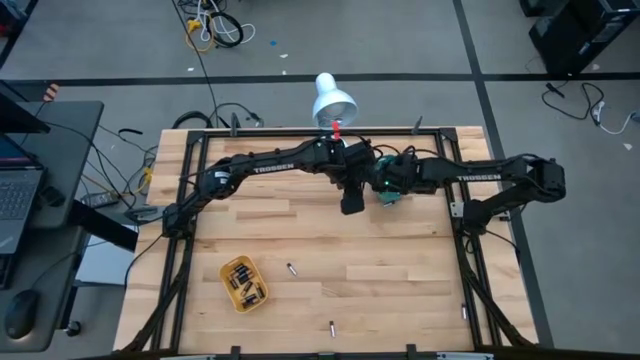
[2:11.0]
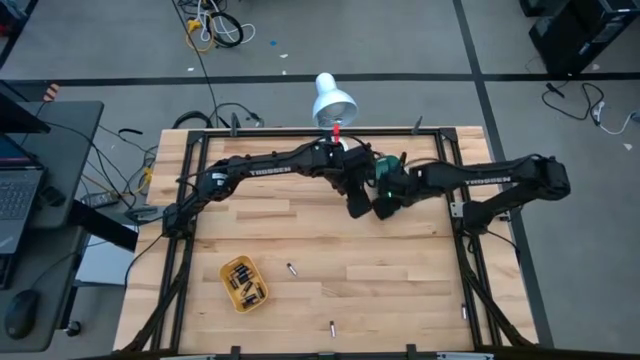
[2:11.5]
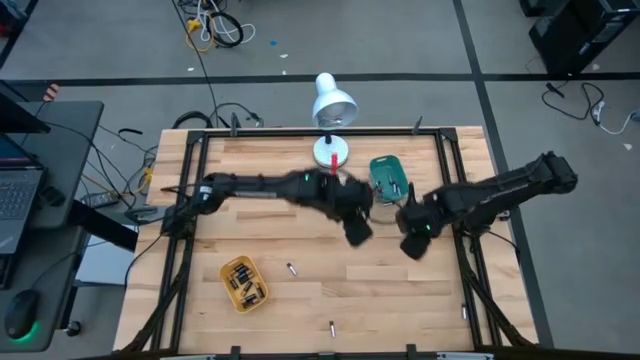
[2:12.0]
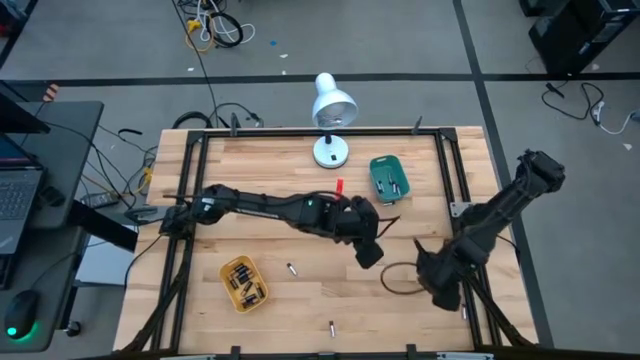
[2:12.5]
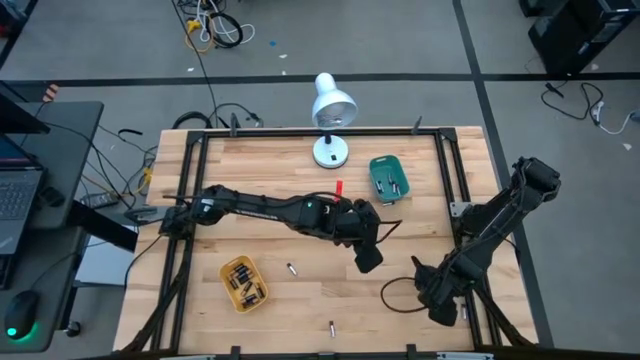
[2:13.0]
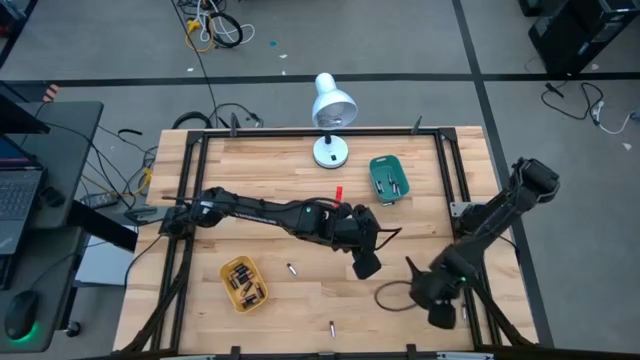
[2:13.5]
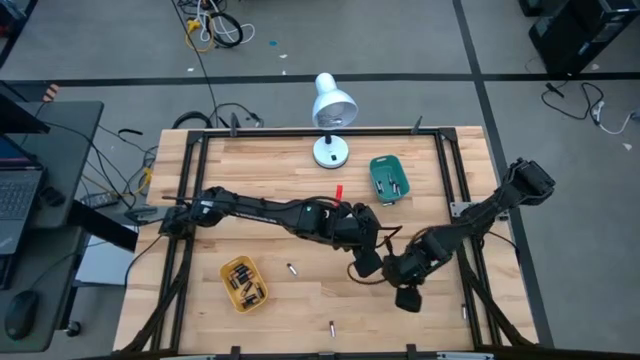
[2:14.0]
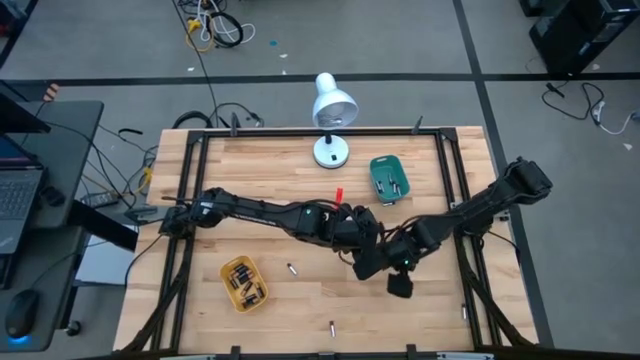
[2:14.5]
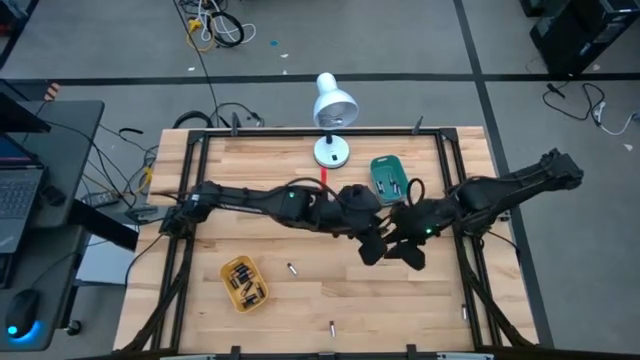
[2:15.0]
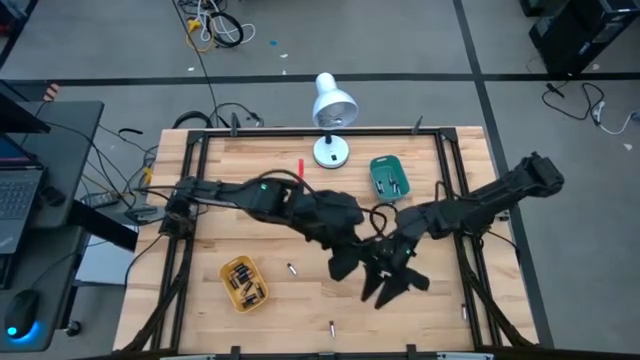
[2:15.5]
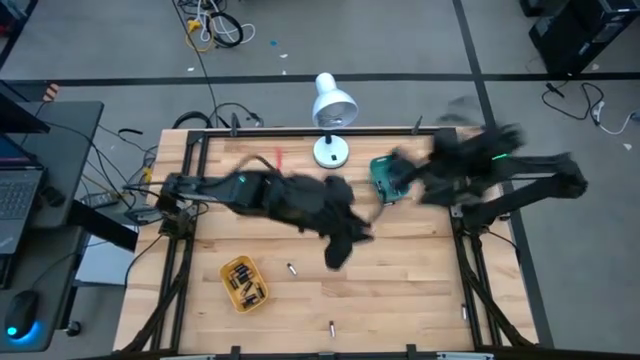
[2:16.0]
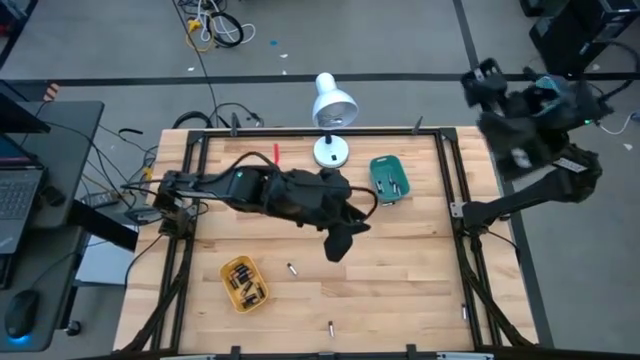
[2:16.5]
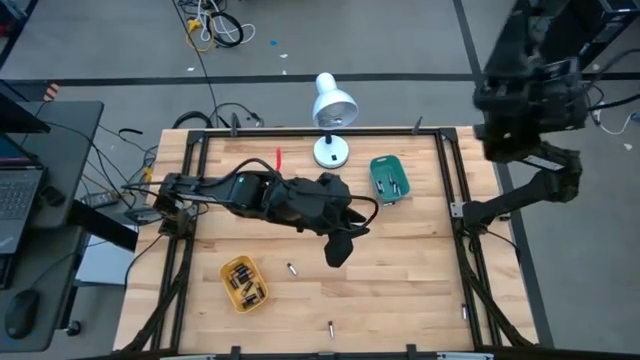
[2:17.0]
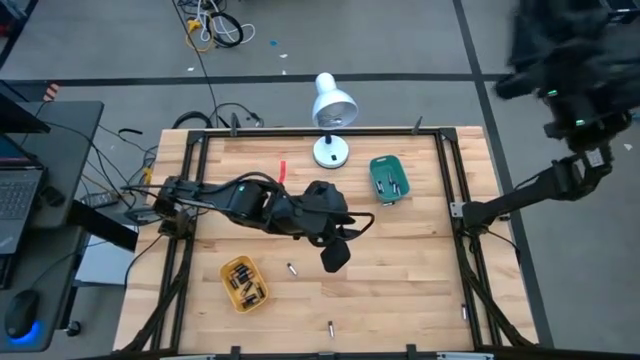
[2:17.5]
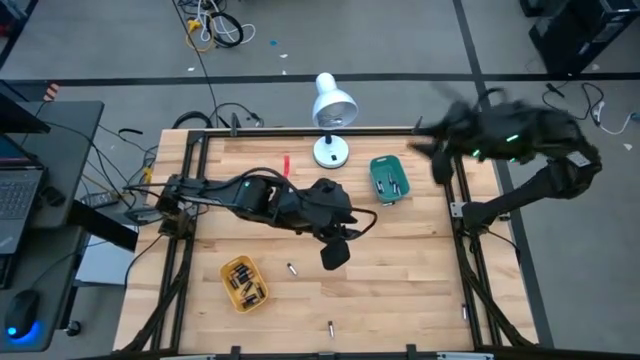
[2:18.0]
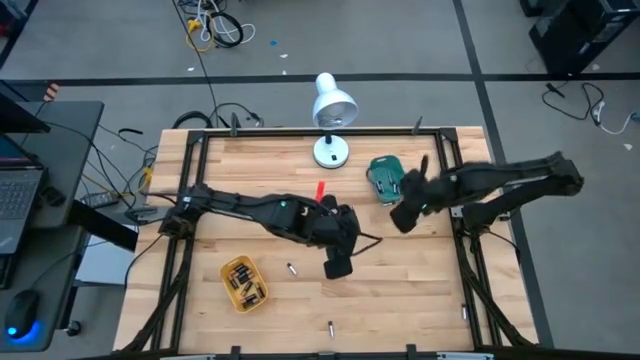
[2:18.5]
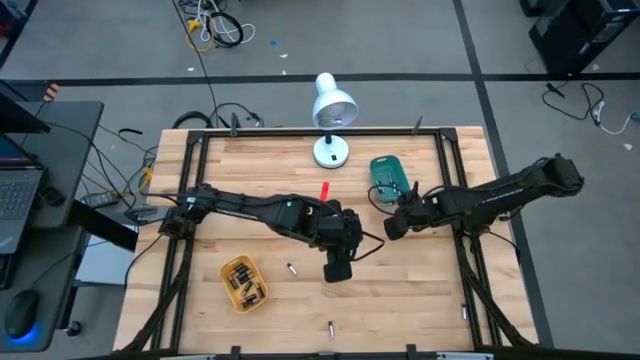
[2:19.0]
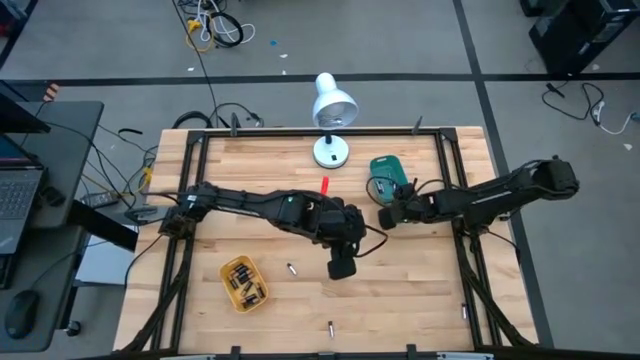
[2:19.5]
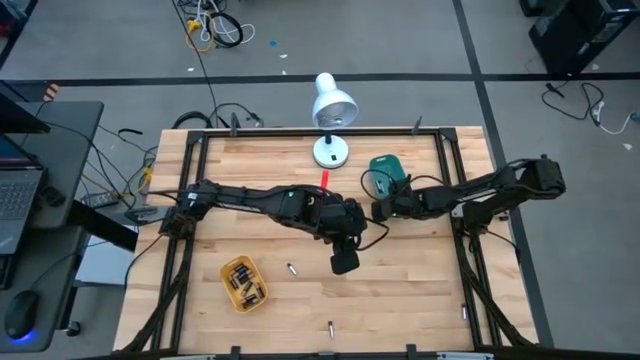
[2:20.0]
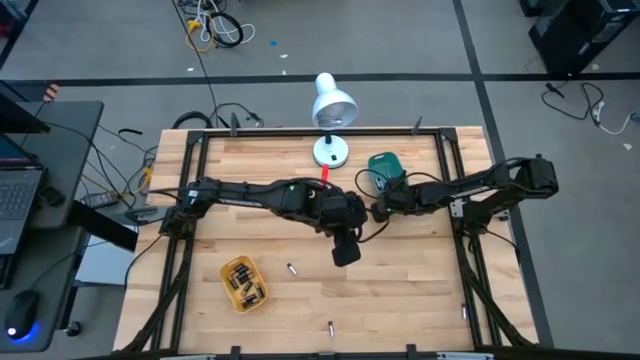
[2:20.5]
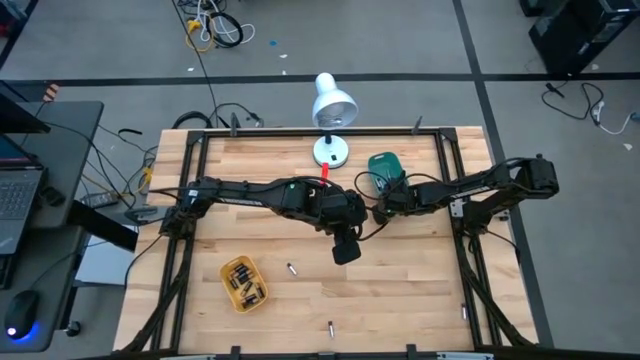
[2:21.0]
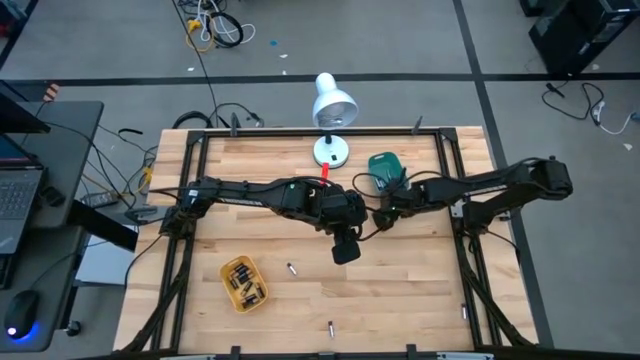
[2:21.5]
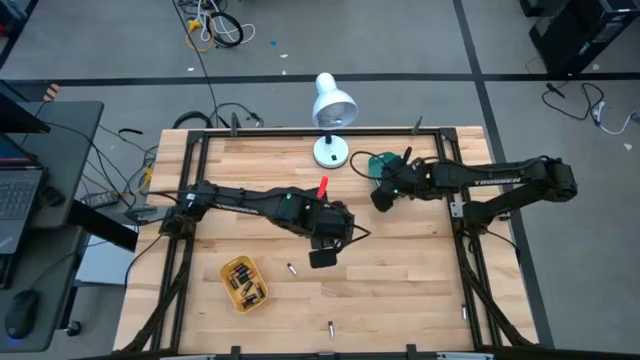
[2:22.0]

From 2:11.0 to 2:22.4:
Task: Sort batteries
Put the silver battery into the green bin

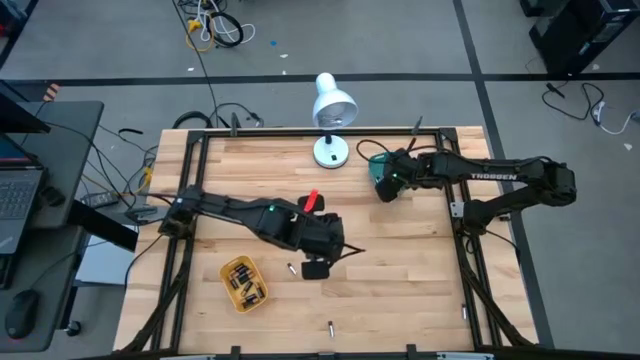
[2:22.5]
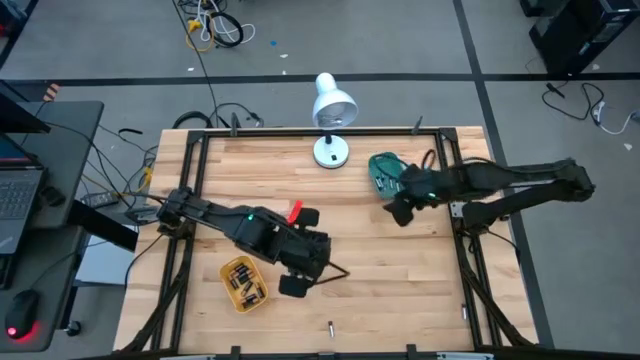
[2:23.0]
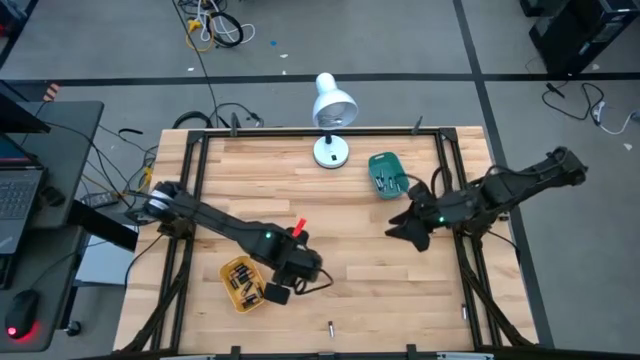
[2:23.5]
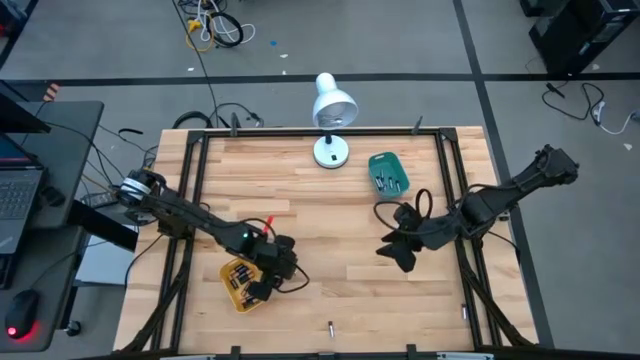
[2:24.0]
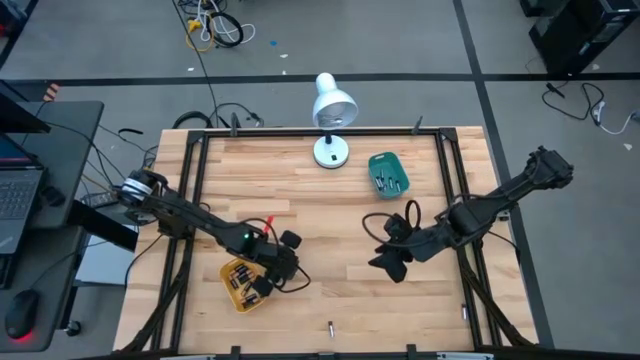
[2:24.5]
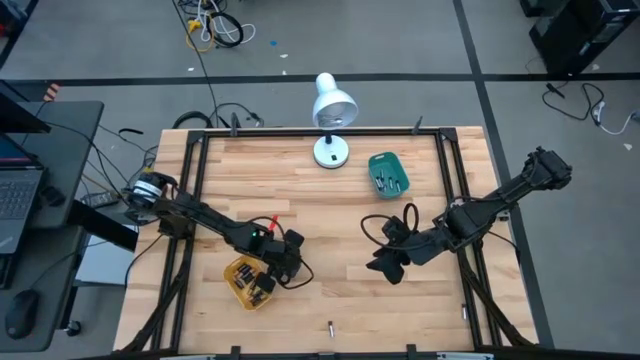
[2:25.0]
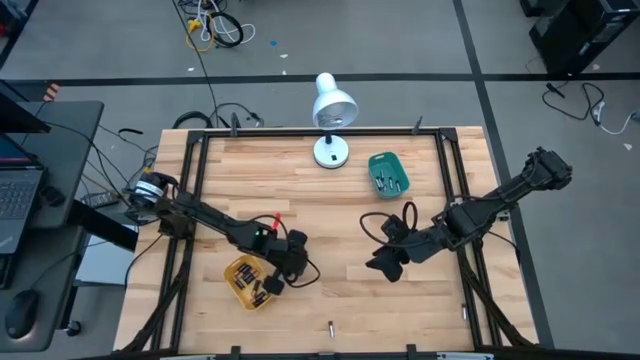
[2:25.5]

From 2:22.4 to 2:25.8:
Put the top left silver battery into the green bin

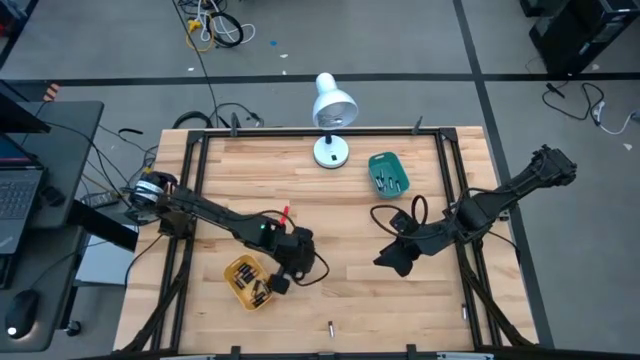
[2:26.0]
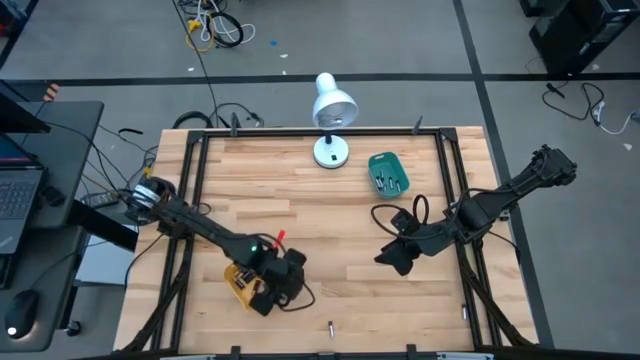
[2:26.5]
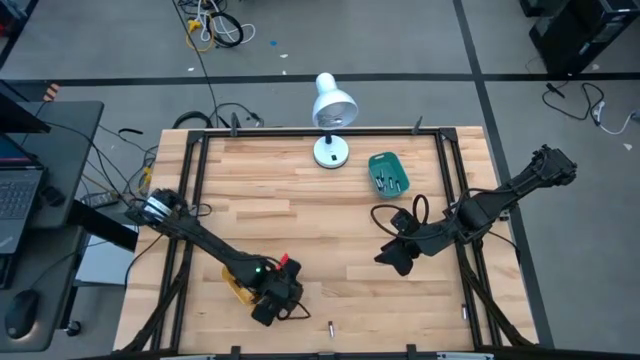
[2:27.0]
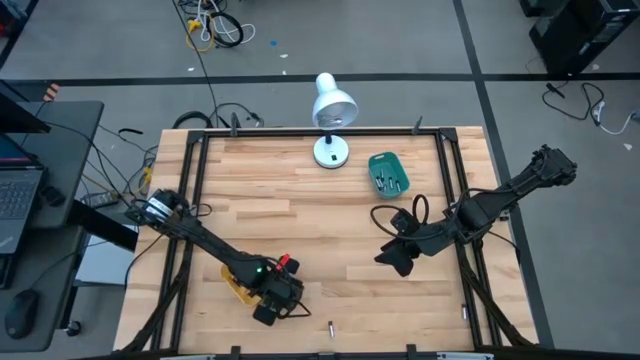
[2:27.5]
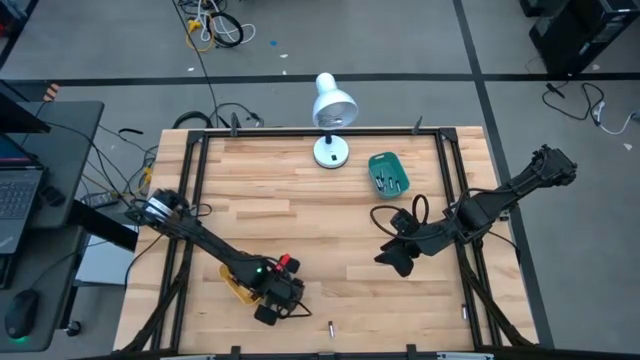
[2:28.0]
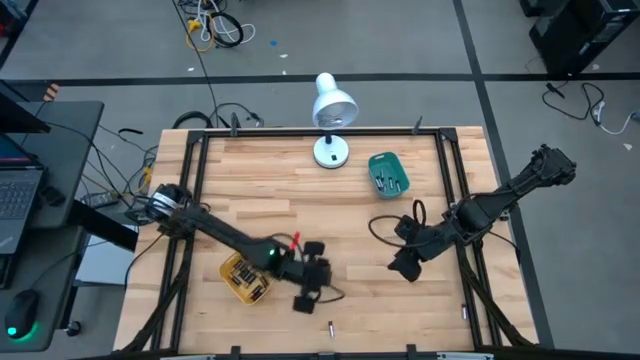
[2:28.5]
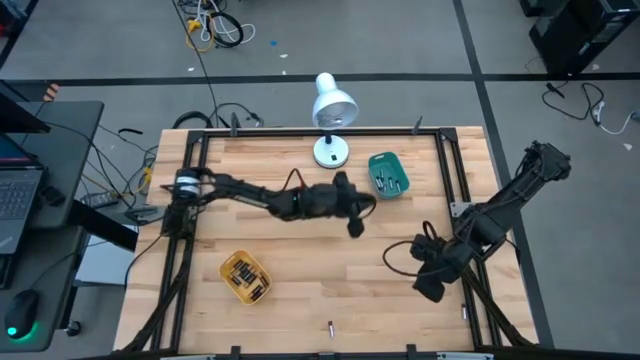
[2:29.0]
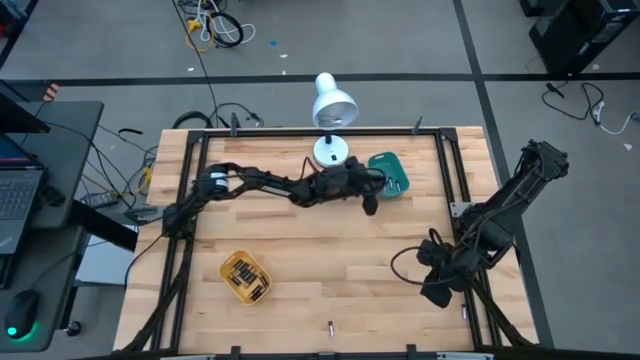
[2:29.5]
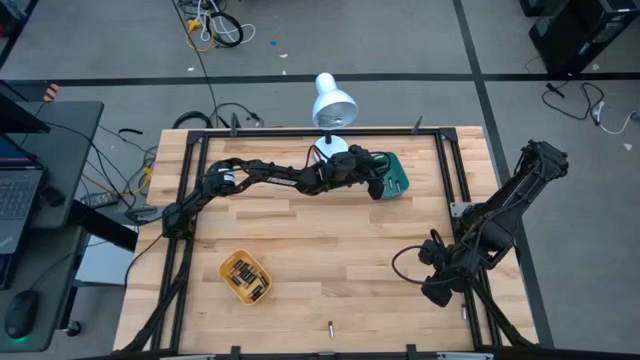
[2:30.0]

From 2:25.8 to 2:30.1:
Put the top left silver battery into the green bin

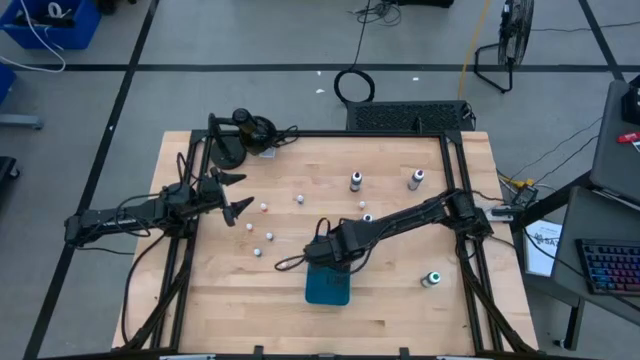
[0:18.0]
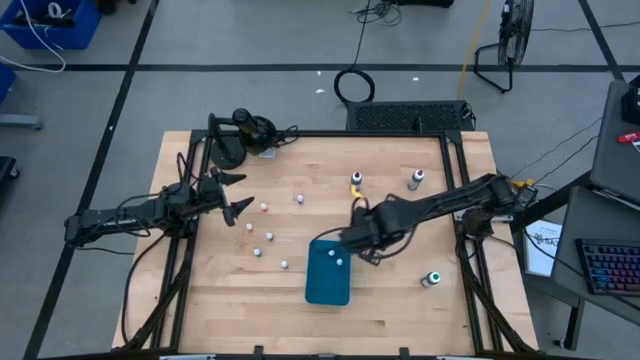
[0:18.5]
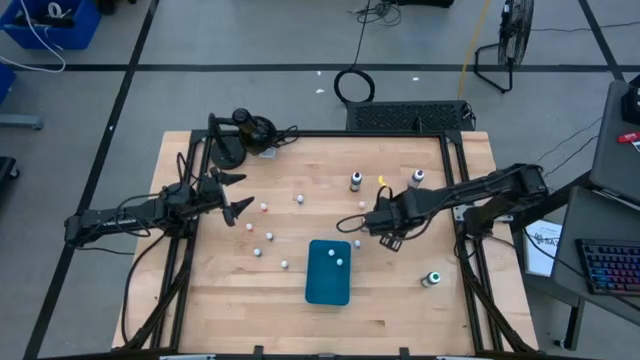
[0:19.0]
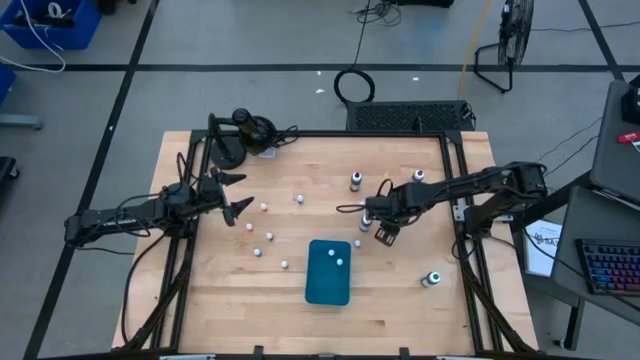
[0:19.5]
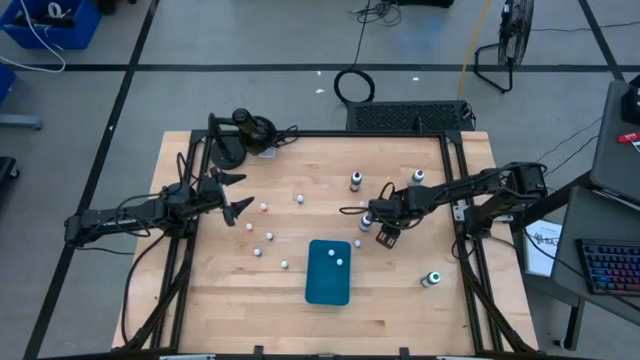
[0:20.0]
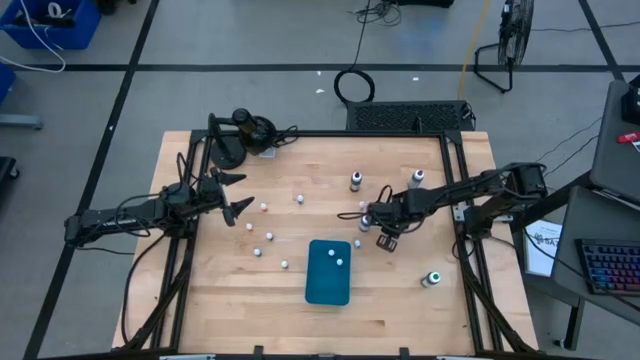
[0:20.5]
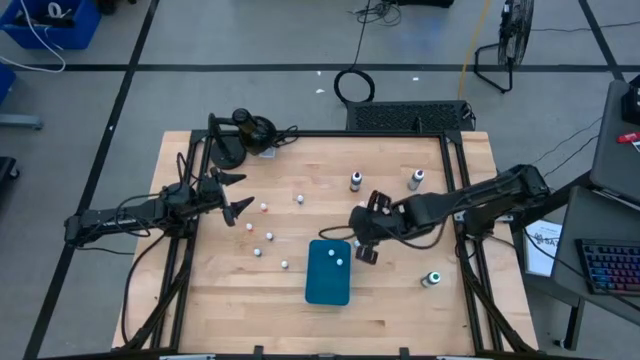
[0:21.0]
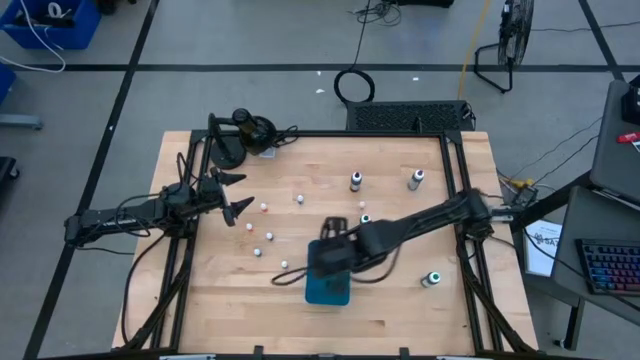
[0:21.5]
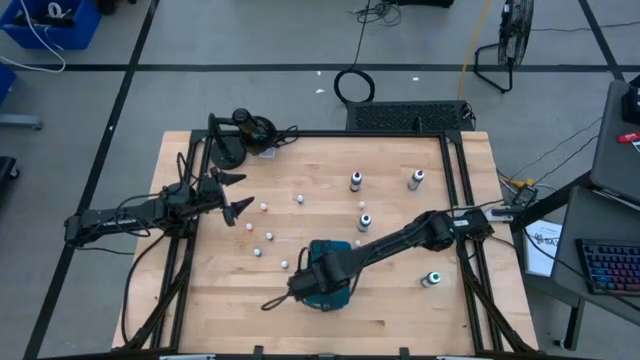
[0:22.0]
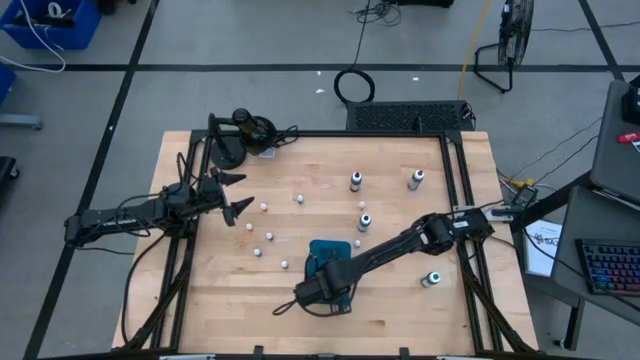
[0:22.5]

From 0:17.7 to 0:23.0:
Task: Pick & Place food coloring
Put the orange small food coloring bottle into the blue bin
